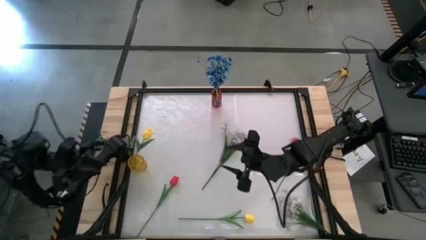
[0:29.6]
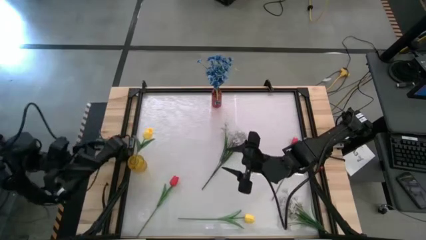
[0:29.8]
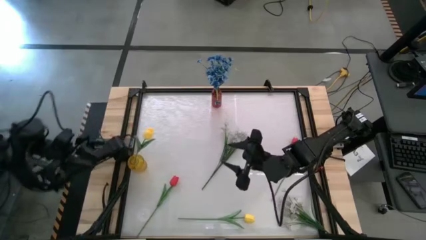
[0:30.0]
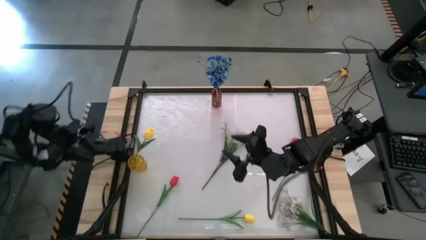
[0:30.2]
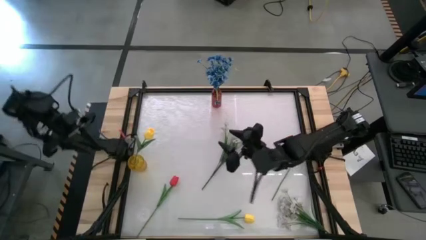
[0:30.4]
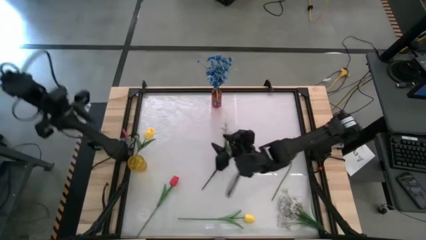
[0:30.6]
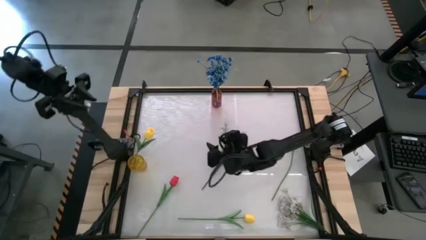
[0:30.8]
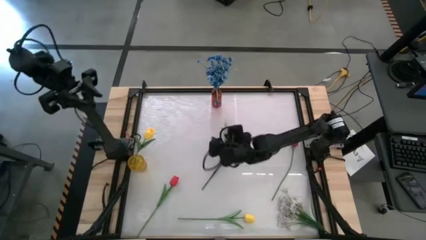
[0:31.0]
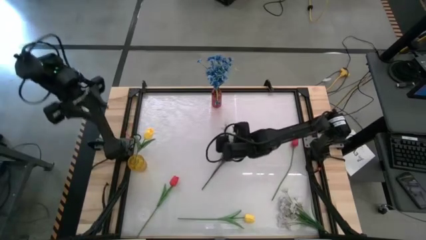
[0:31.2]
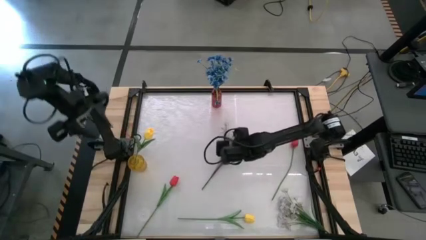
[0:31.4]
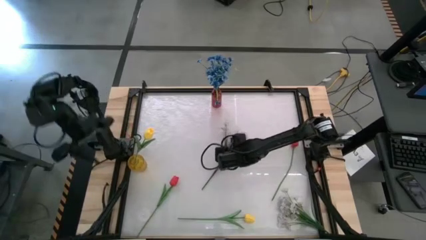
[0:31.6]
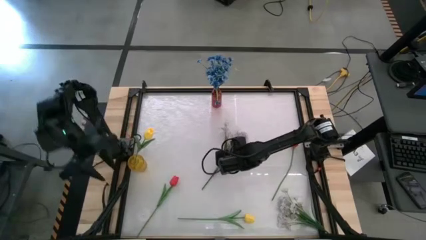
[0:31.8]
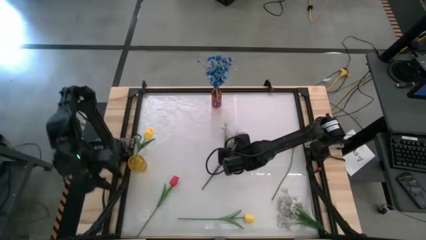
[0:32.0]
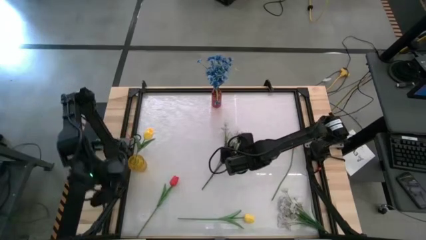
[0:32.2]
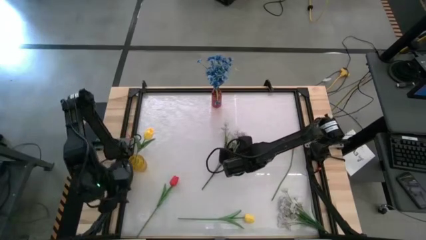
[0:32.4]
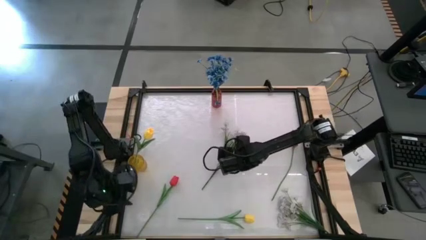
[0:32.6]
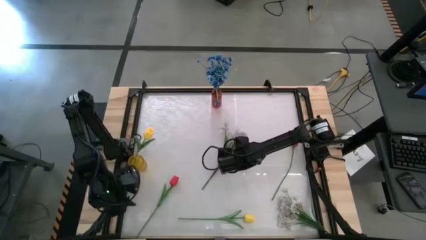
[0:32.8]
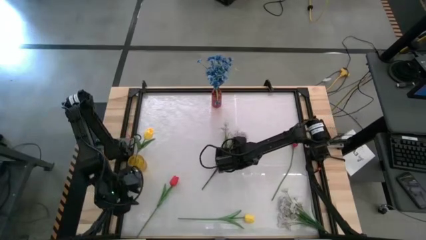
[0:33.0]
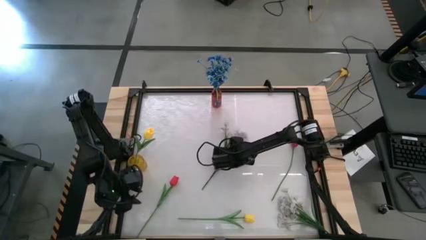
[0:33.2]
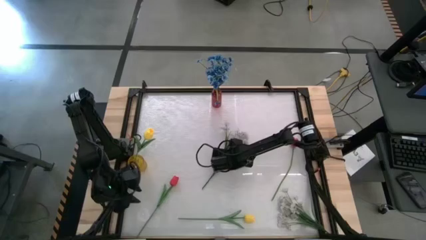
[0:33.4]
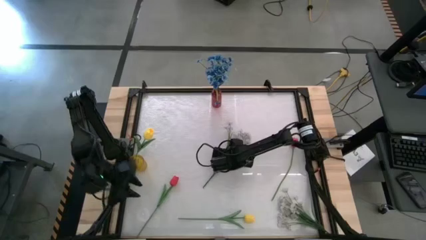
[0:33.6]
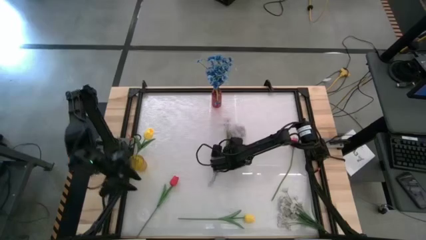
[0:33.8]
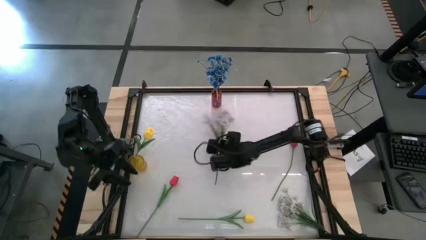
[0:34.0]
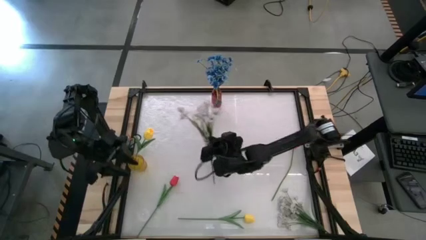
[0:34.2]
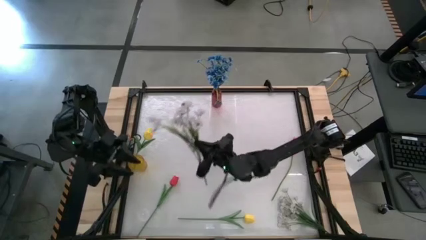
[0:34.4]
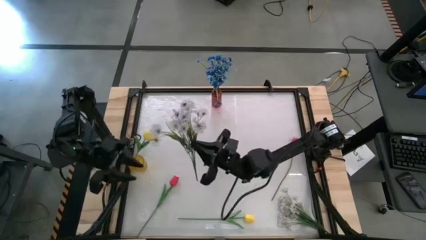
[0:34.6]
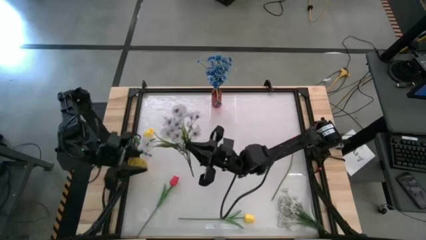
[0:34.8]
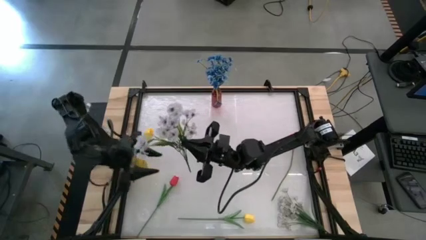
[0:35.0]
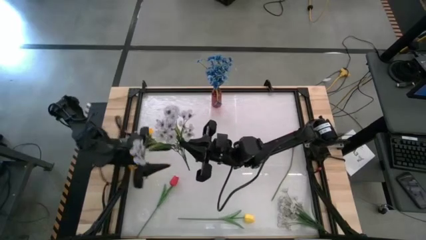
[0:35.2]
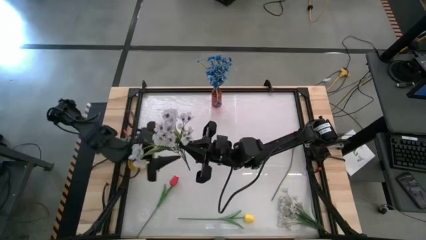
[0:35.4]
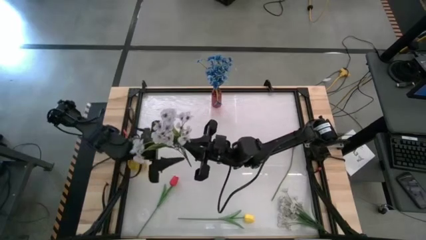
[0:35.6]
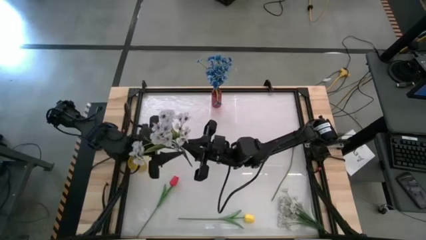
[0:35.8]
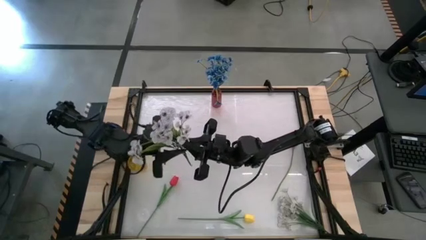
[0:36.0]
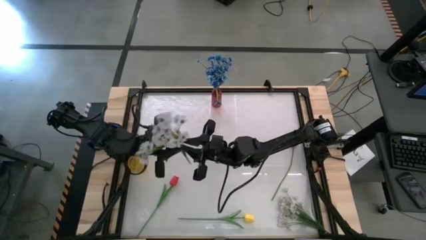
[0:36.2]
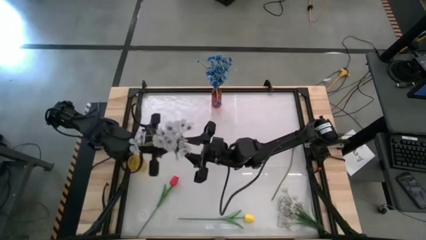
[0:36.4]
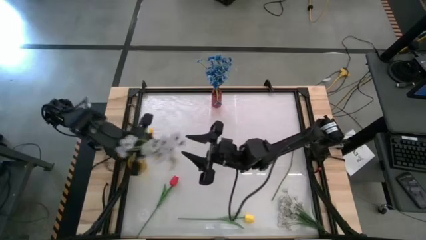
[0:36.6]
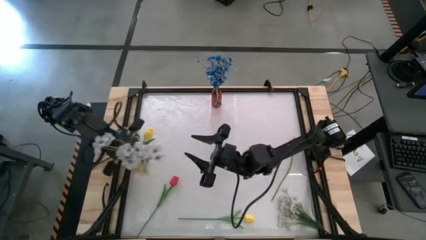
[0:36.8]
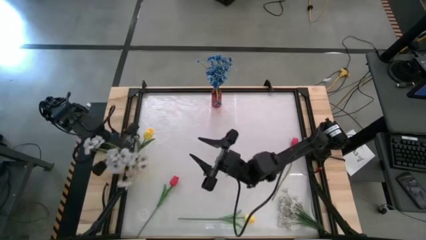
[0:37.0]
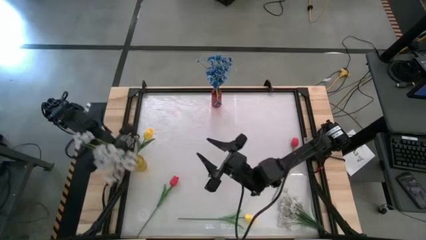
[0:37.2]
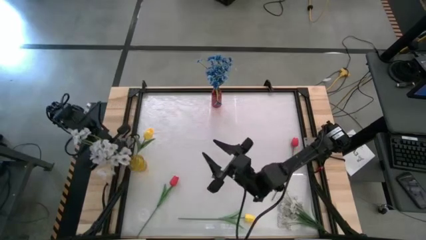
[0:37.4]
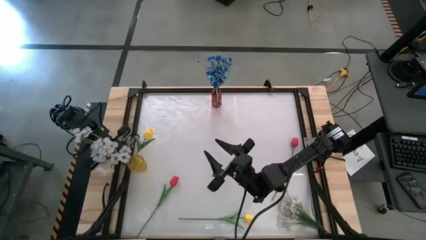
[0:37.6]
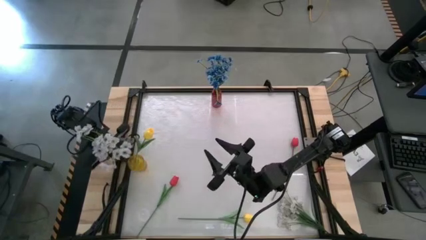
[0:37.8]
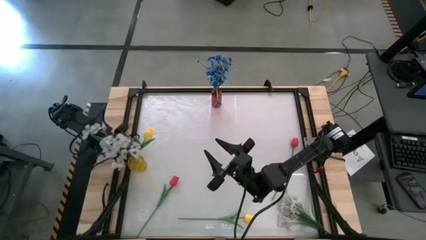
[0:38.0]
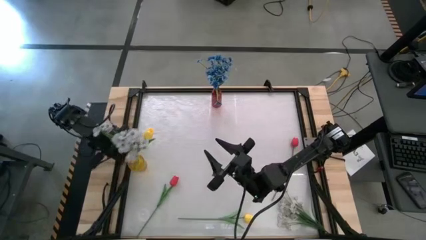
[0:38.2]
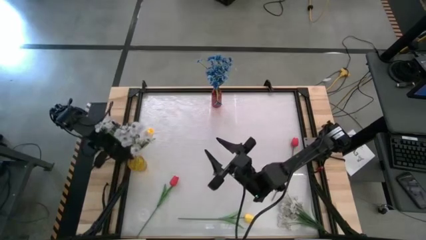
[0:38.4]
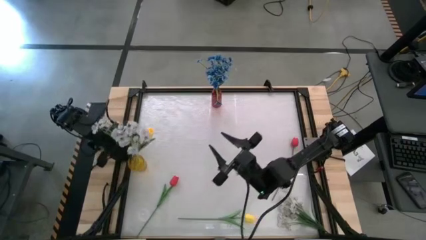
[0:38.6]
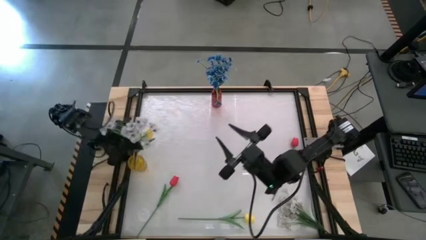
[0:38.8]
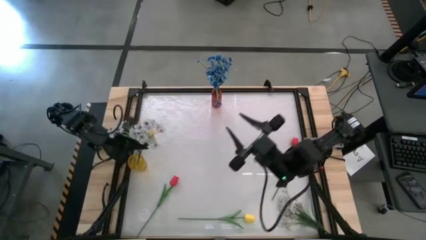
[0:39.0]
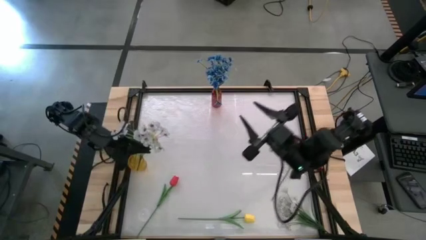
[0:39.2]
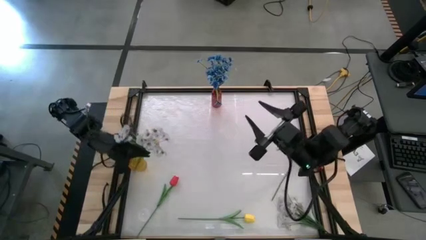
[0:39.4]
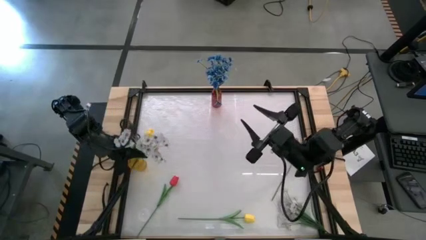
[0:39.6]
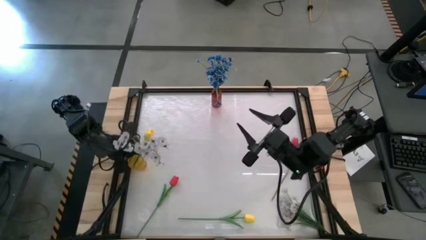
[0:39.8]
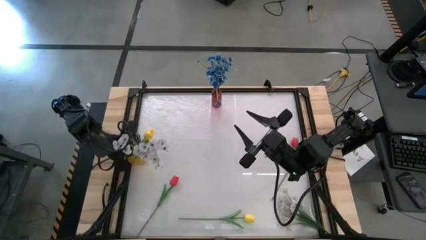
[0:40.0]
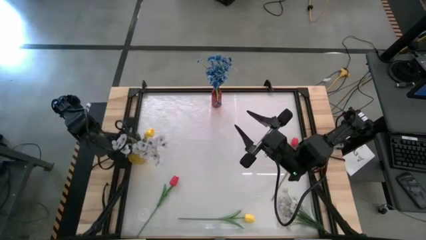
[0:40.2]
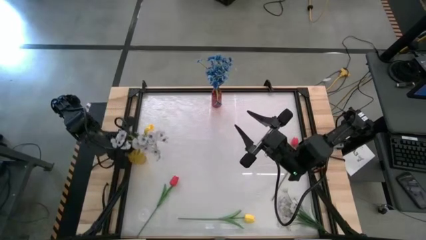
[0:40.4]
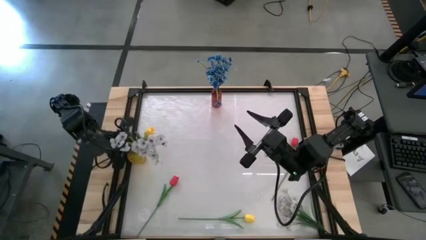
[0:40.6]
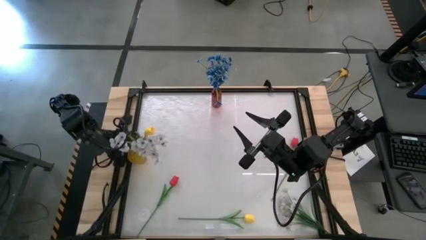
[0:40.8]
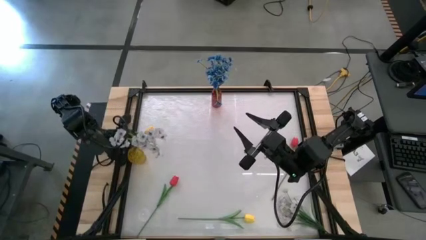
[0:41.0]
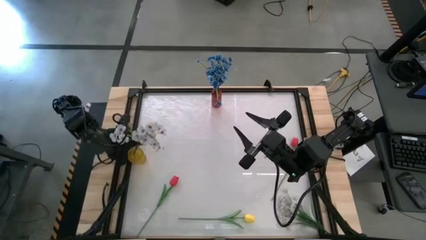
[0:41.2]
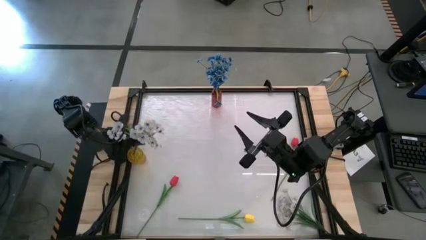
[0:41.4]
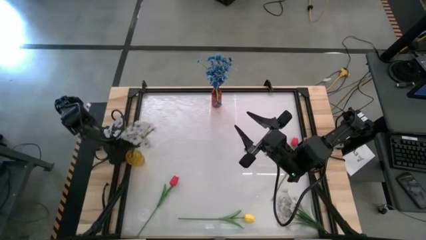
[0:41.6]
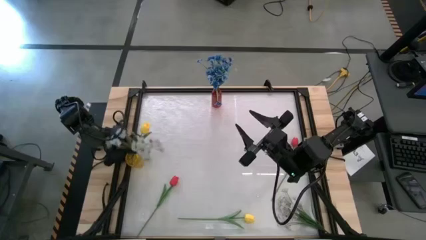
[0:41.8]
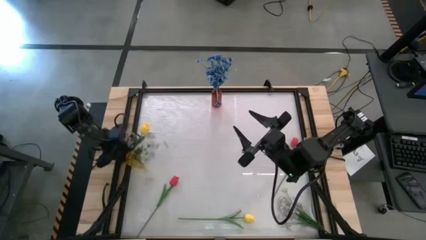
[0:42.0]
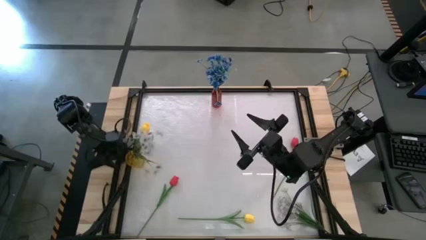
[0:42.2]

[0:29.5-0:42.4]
Task: Sort flowers into vase by color
Put the top white flowers into the yellow flower vase
